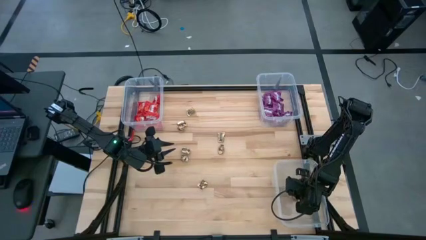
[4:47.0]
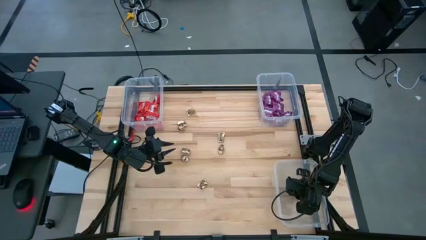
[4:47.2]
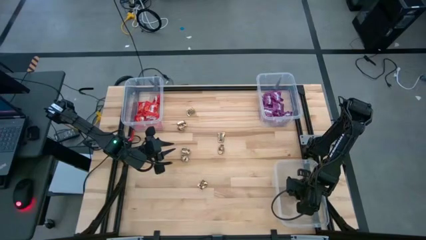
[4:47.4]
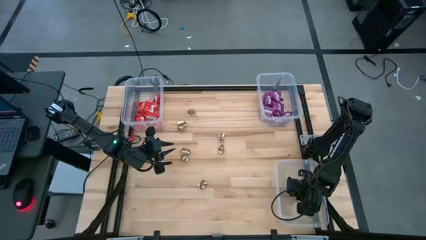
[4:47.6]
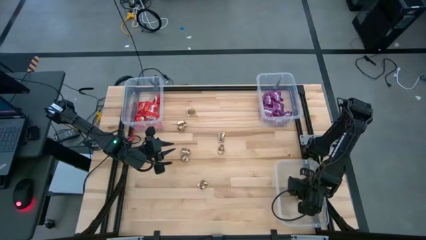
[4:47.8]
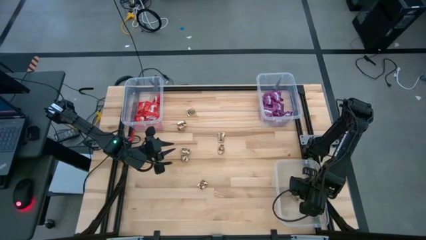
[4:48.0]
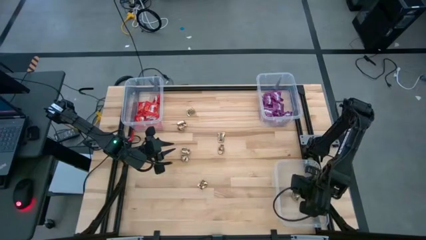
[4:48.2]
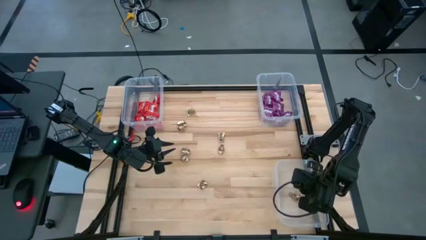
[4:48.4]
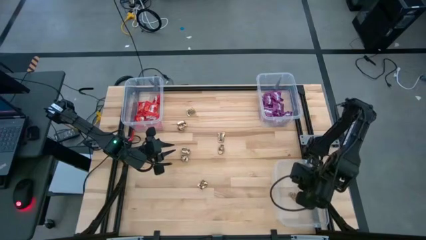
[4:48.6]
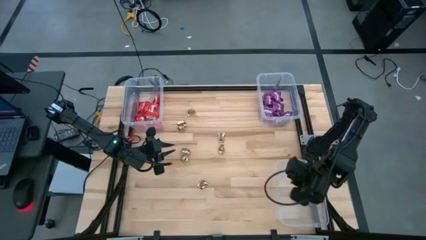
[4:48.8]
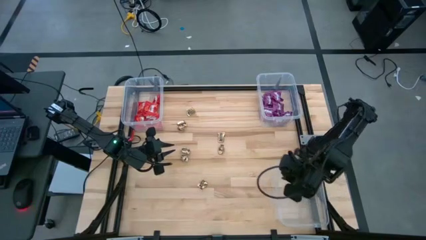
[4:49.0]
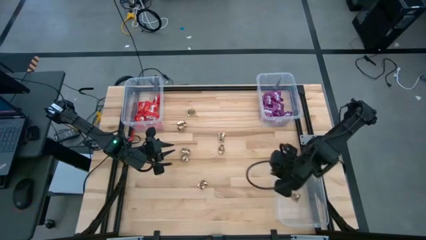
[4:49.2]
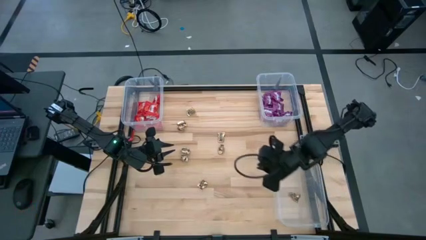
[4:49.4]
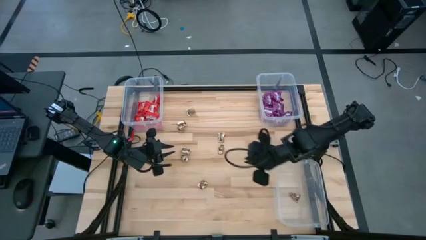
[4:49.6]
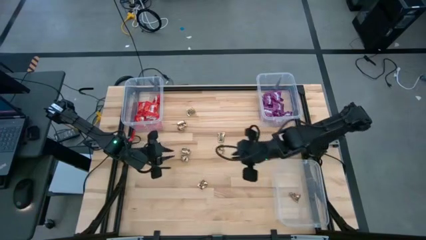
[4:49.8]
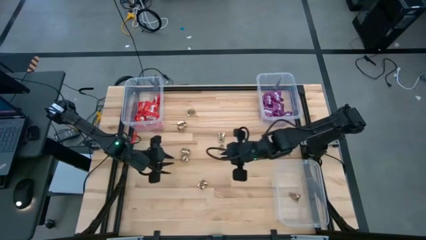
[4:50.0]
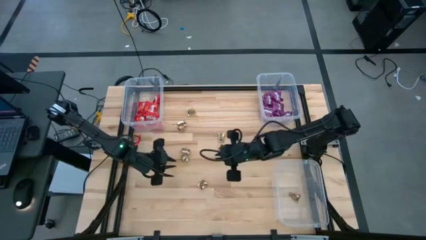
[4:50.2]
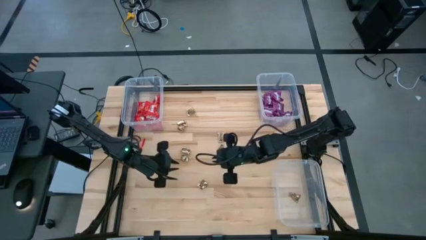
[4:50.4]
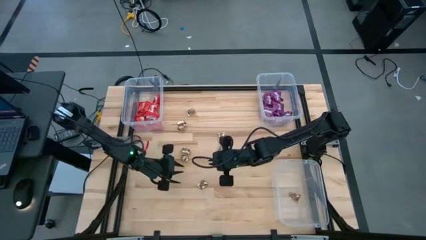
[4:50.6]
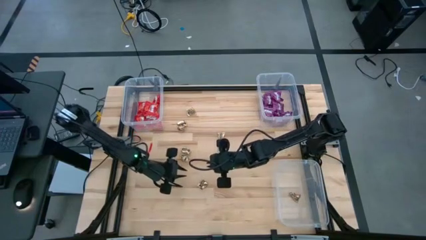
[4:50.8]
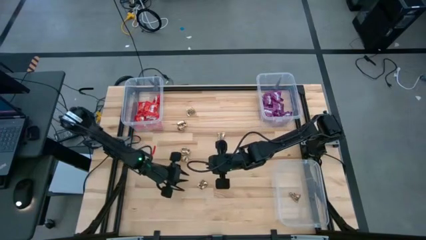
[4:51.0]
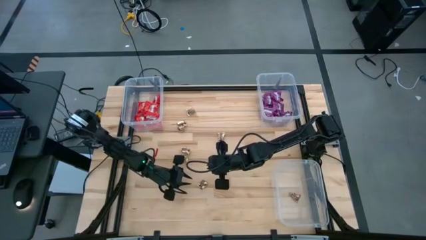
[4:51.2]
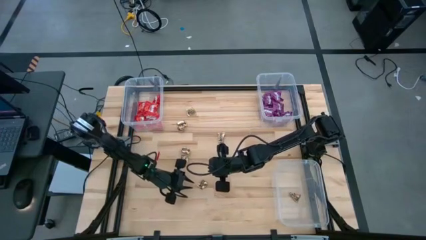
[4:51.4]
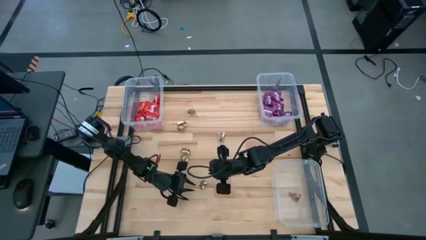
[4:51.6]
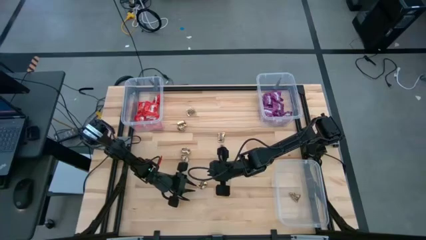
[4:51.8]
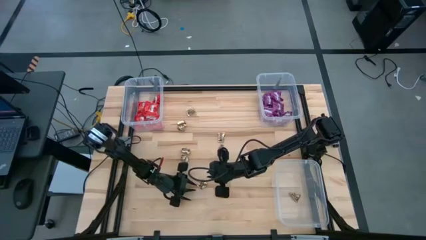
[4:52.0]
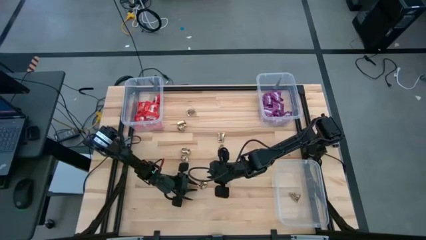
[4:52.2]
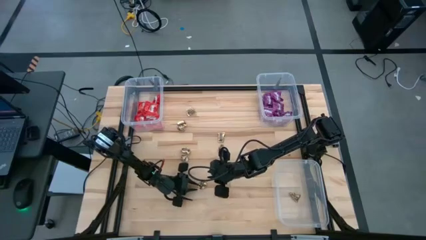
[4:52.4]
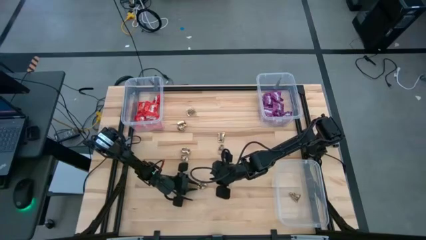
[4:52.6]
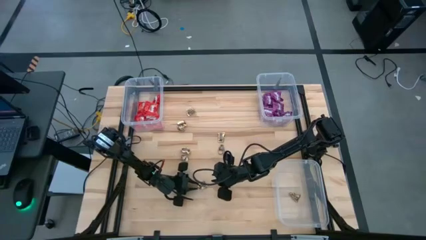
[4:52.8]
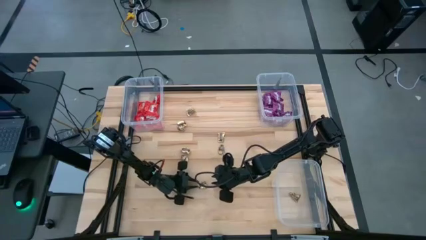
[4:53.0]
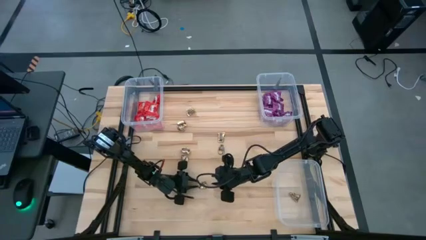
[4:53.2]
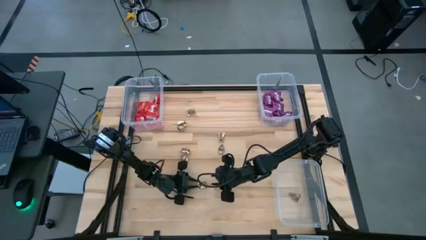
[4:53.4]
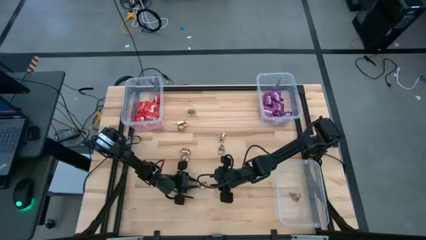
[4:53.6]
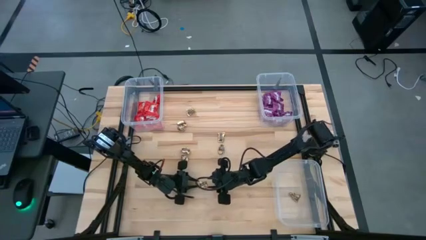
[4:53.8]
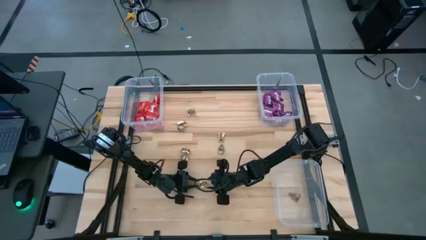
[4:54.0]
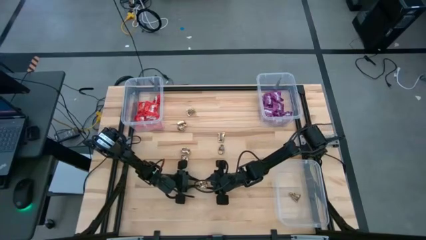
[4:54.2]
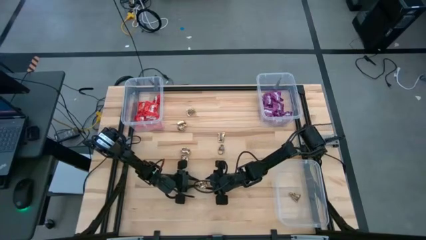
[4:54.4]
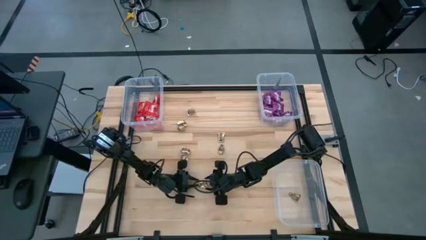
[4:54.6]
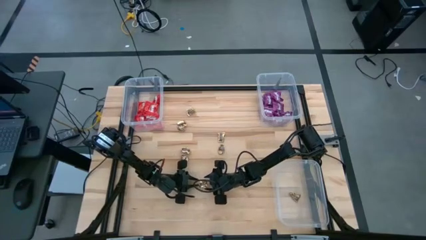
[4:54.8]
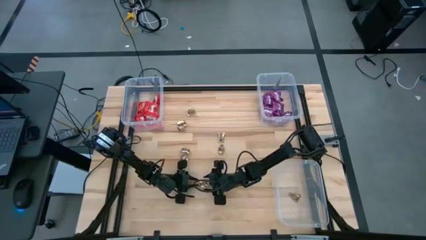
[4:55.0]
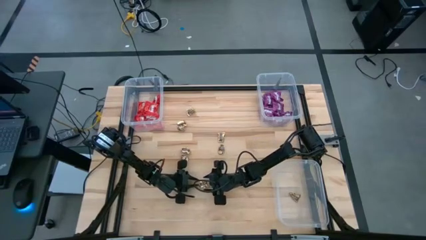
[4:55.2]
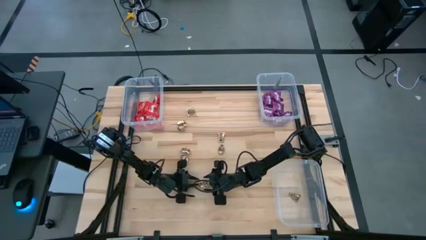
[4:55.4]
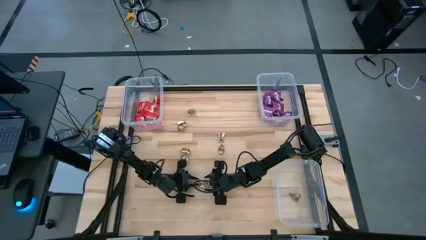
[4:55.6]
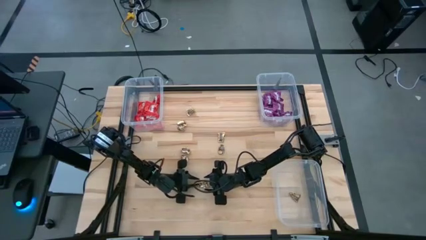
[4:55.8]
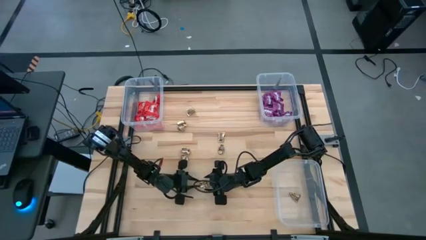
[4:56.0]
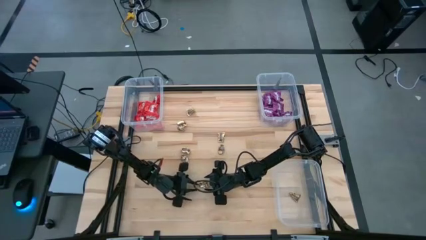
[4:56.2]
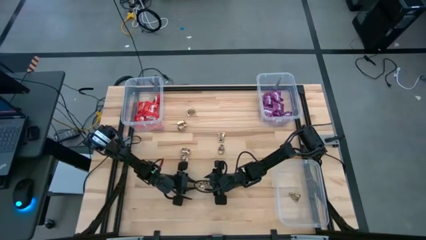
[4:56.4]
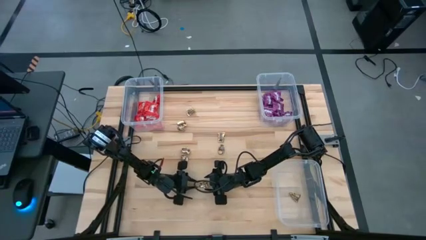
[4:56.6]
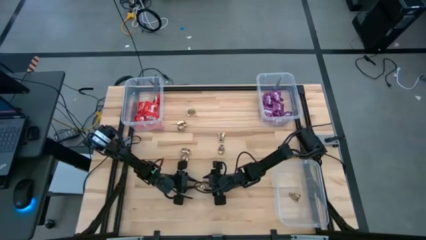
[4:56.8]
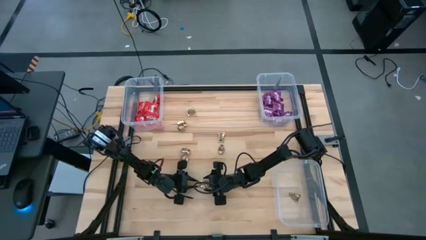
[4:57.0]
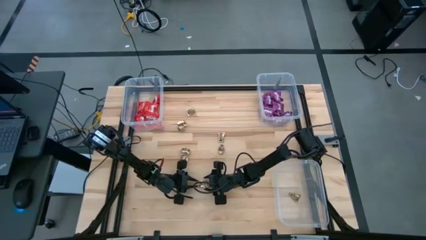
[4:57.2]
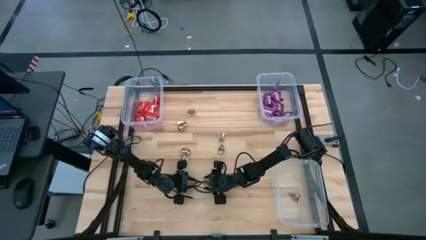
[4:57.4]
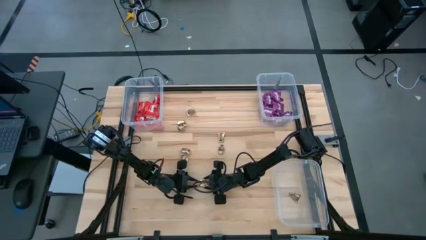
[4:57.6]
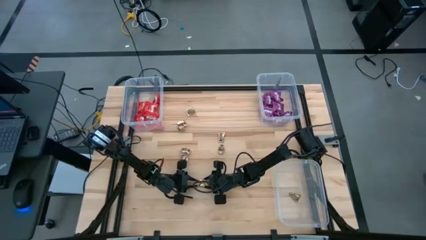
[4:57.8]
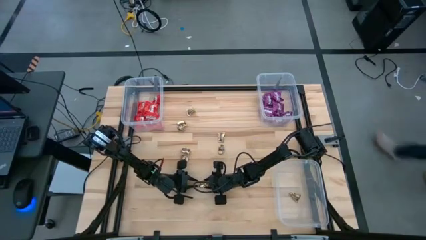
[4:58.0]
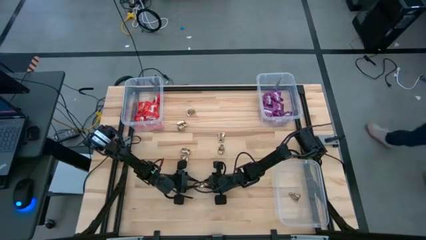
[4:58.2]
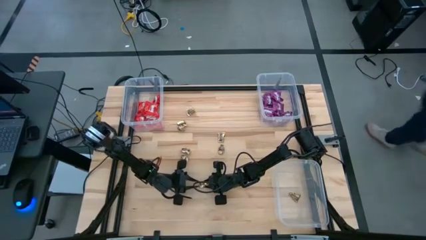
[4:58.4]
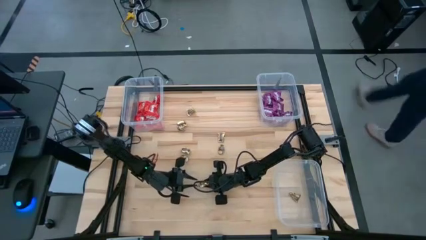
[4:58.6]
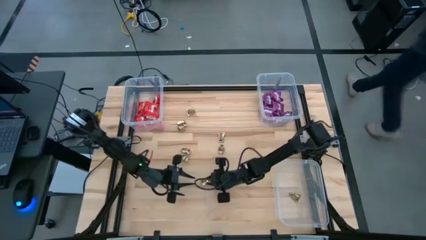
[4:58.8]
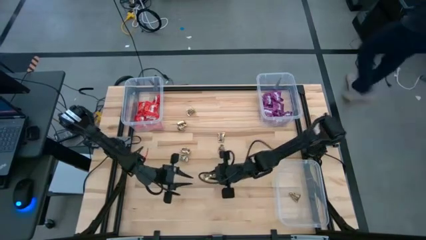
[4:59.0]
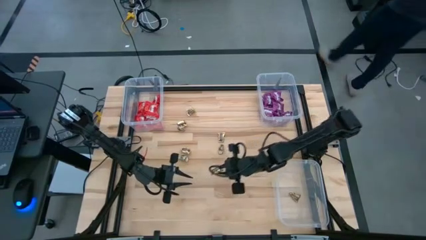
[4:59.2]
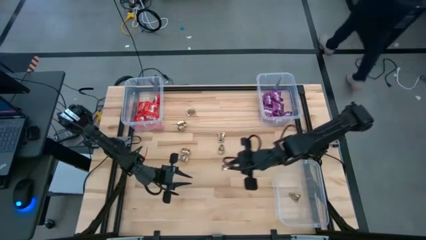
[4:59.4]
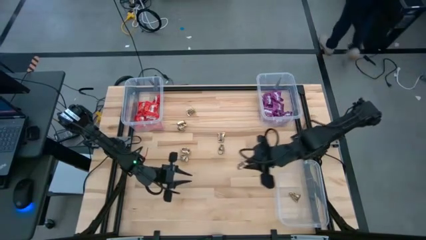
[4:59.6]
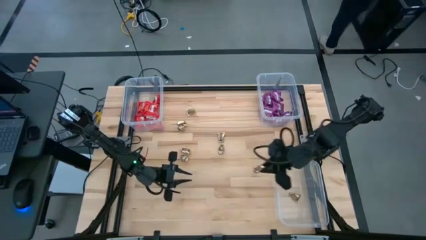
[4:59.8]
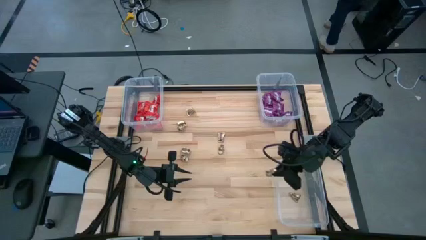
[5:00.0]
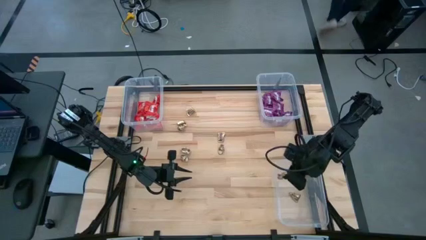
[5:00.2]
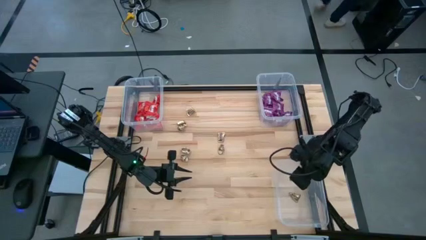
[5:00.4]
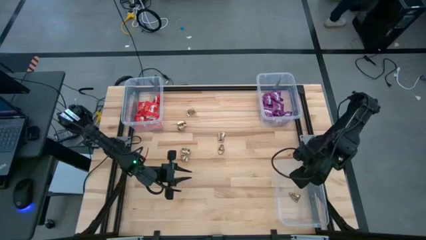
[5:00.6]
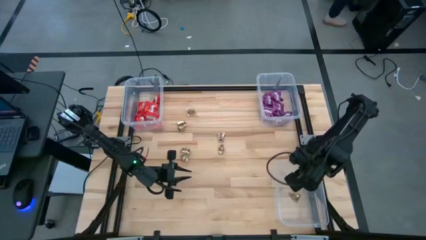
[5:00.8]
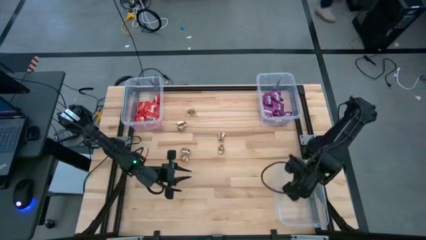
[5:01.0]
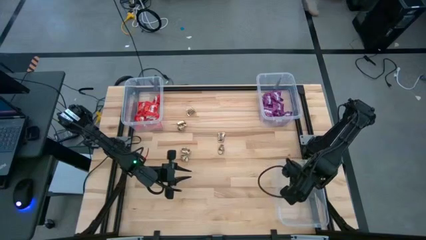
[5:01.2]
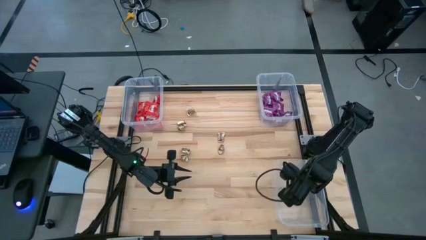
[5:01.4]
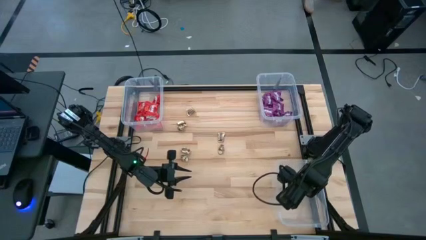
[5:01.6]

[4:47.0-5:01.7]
Task: Sort candy
Put the yellow candy into the bottom right transparent bin

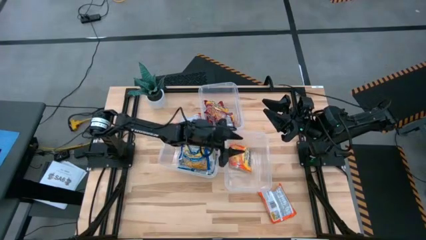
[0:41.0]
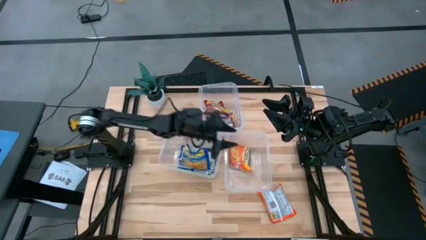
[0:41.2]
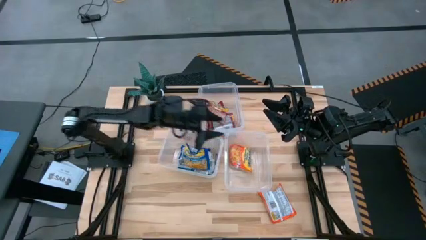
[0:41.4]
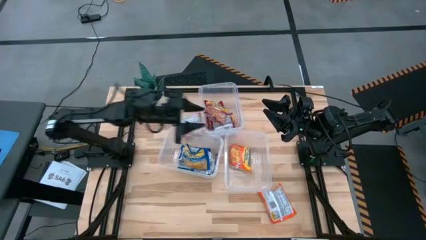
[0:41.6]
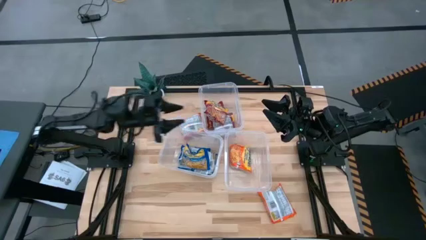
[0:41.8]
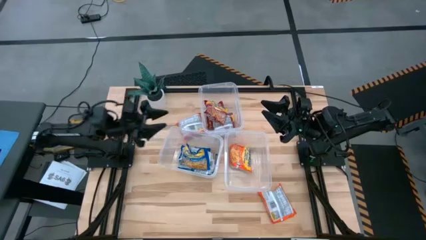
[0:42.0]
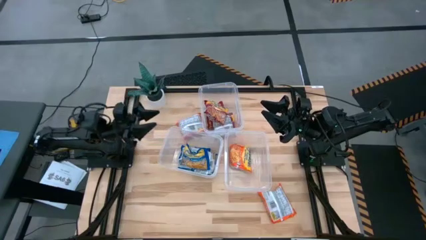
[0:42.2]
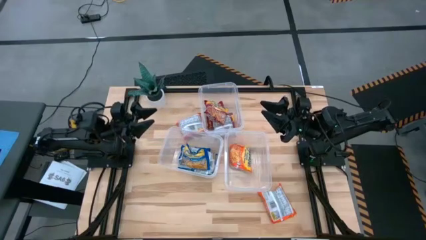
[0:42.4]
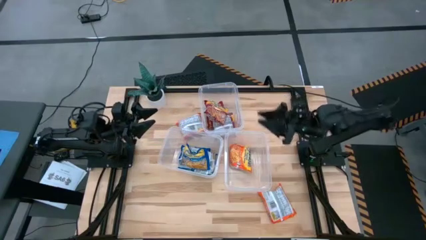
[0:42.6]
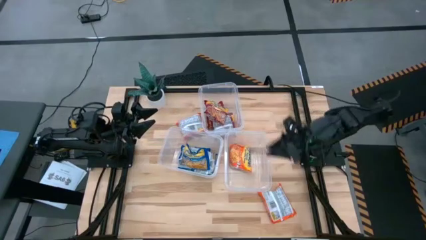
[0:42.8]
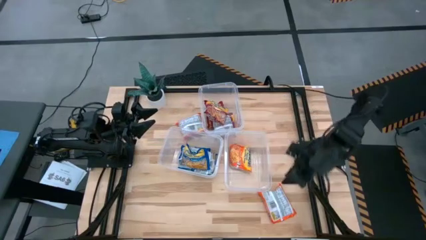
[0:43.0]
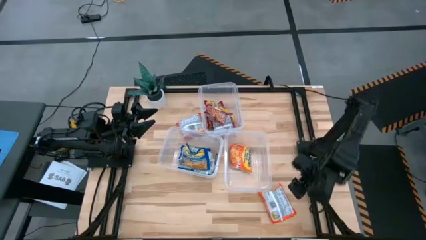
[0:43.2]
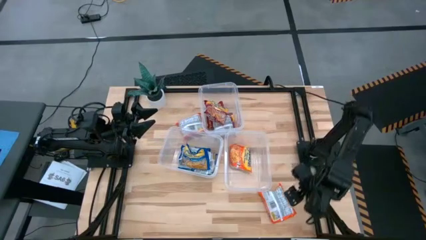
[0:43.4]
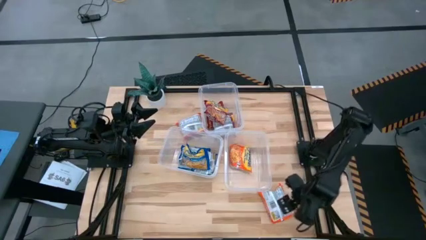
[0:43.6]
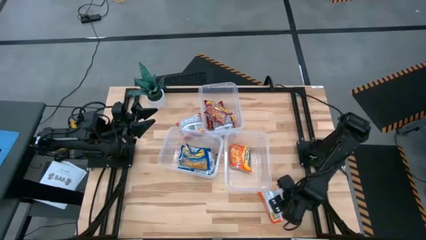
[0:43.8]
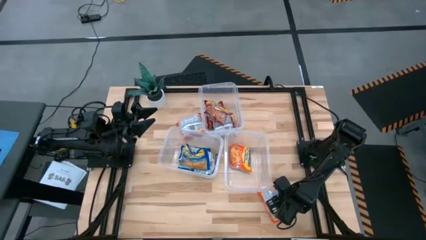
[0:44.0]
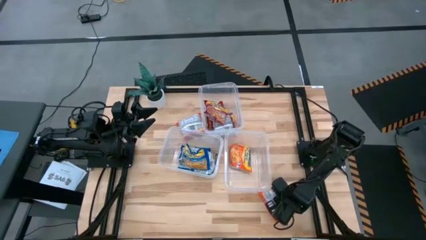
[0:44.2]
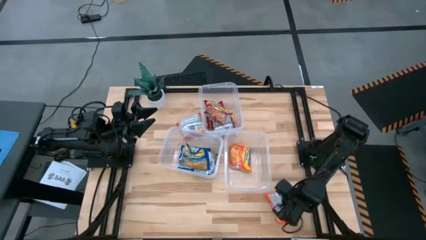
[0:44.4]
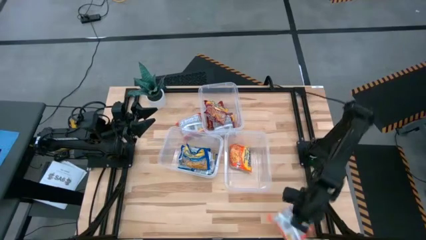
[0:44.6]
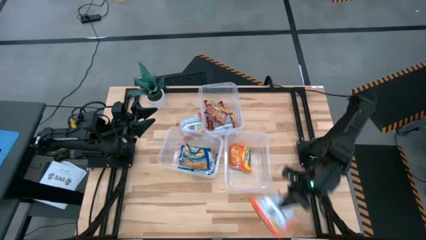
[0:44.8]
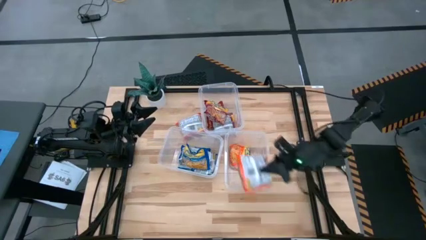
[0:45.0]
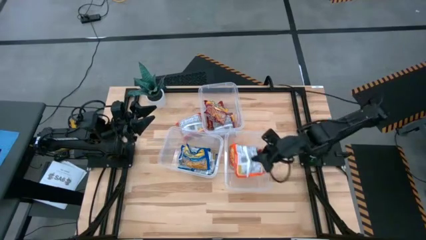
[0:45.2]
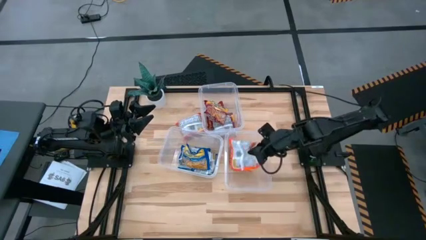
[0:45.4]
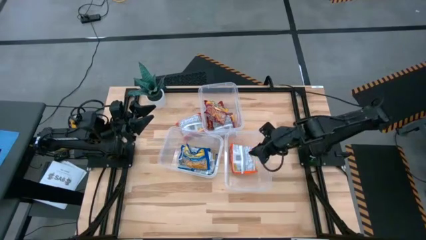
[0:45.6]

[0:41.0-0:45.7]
Task: Sort Maruchan noodles
Put the bottom orange noodle pack into the bottom right transparent bin
